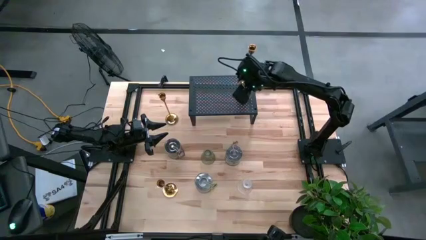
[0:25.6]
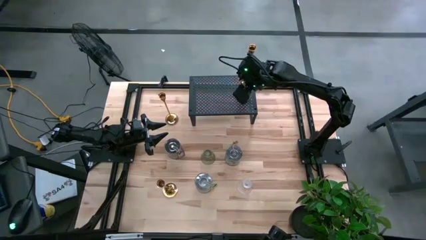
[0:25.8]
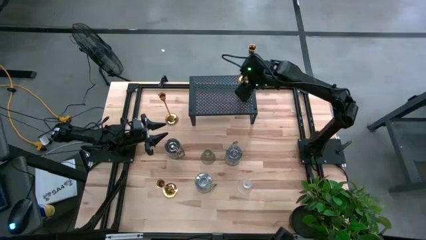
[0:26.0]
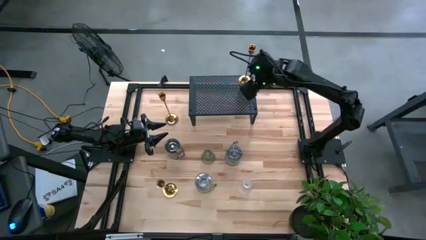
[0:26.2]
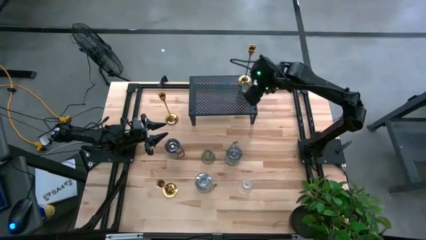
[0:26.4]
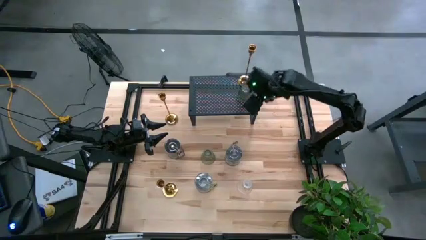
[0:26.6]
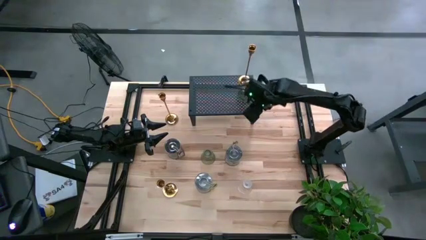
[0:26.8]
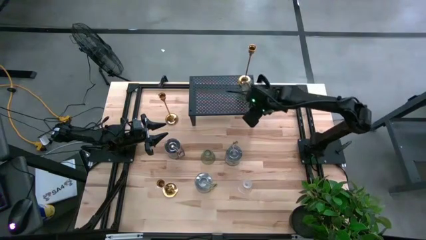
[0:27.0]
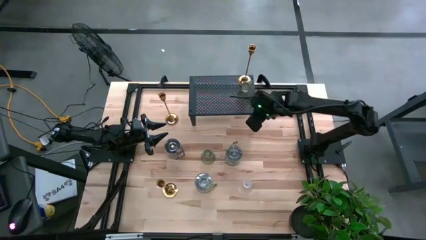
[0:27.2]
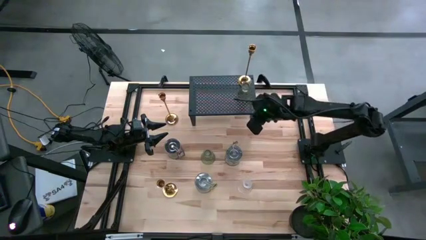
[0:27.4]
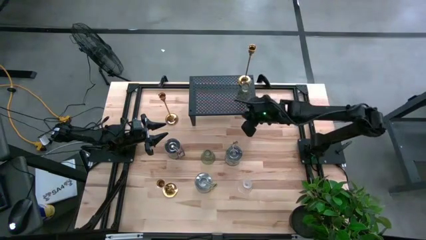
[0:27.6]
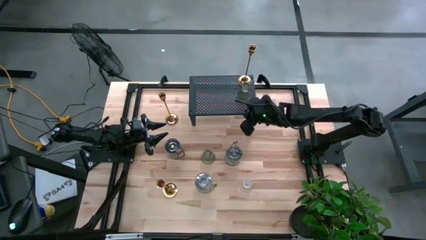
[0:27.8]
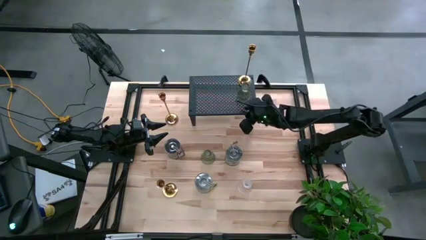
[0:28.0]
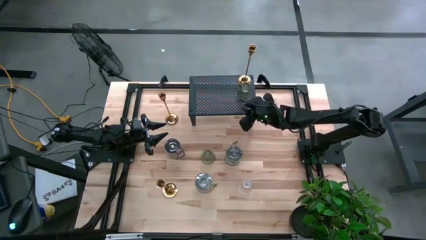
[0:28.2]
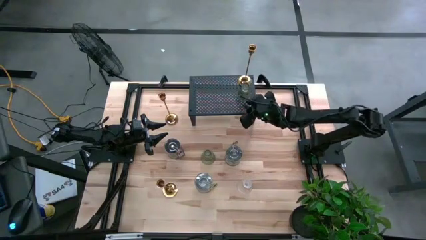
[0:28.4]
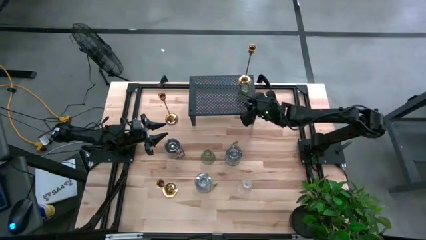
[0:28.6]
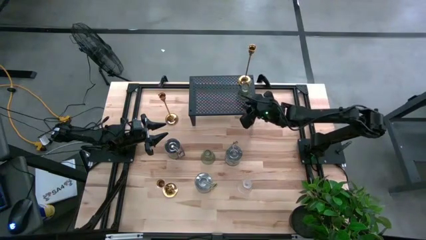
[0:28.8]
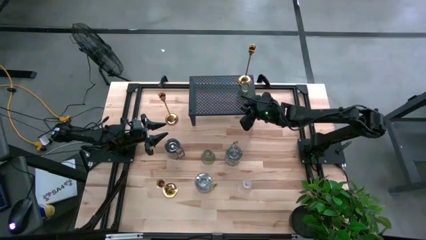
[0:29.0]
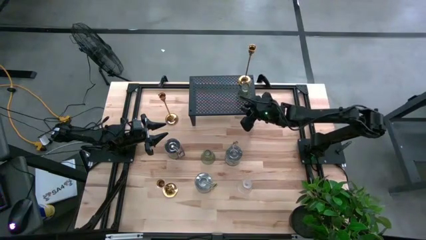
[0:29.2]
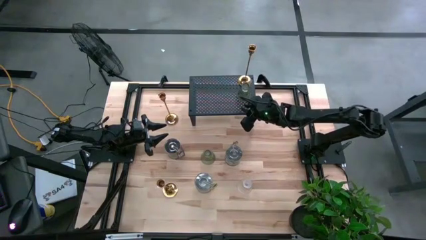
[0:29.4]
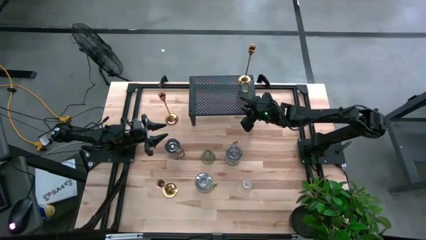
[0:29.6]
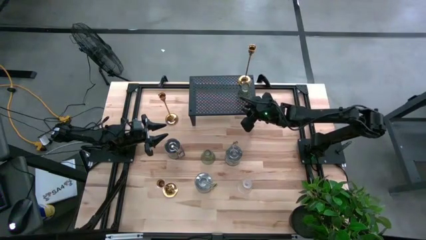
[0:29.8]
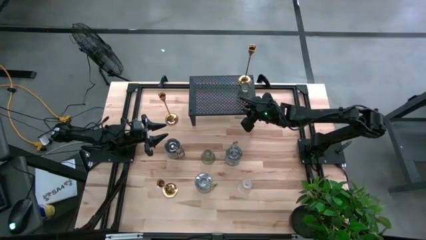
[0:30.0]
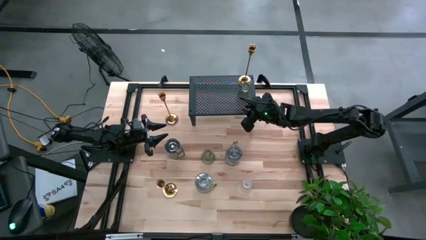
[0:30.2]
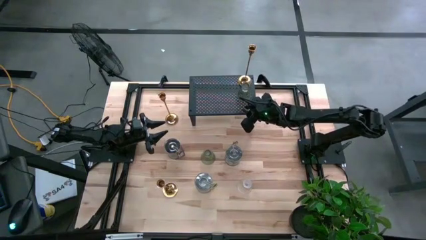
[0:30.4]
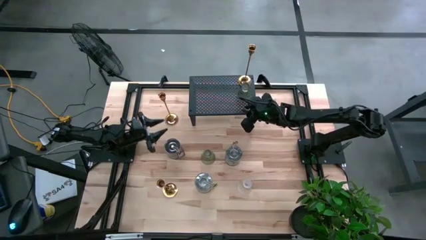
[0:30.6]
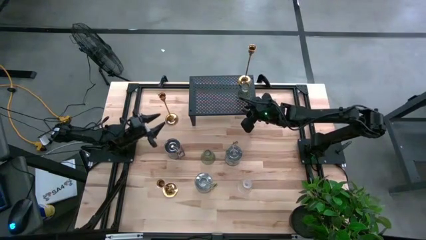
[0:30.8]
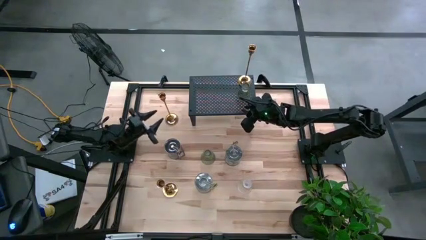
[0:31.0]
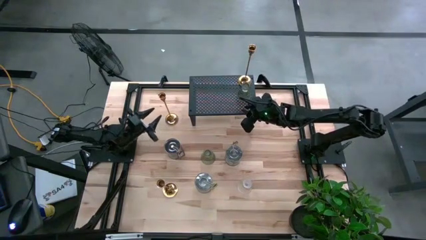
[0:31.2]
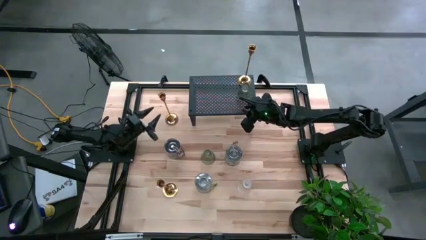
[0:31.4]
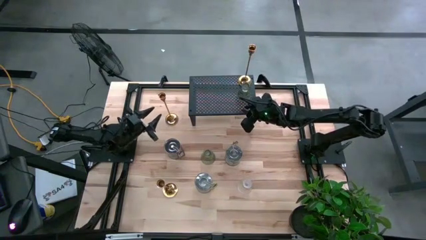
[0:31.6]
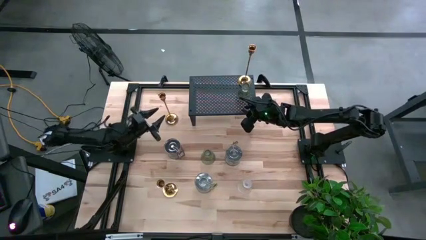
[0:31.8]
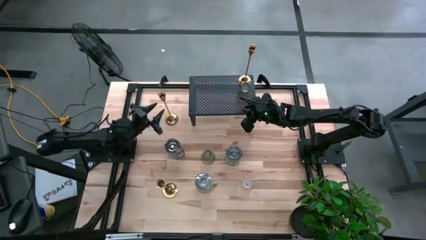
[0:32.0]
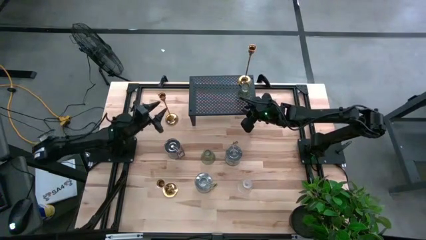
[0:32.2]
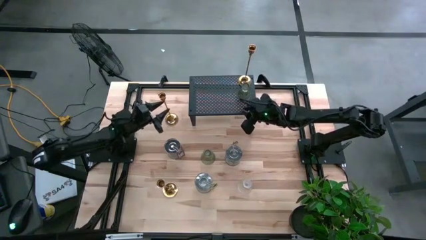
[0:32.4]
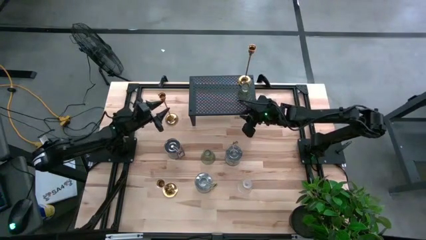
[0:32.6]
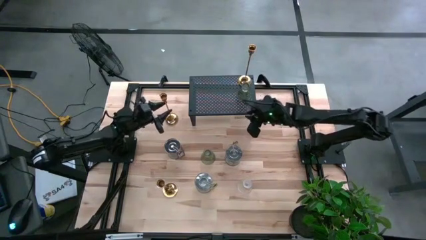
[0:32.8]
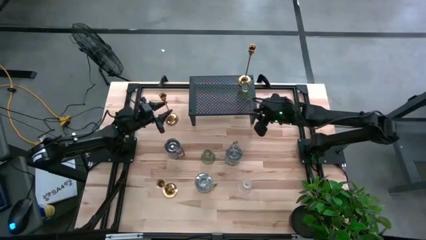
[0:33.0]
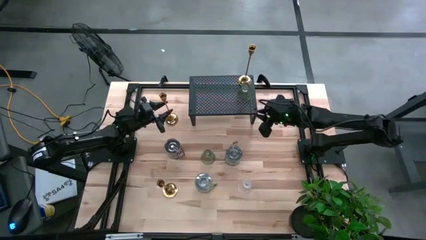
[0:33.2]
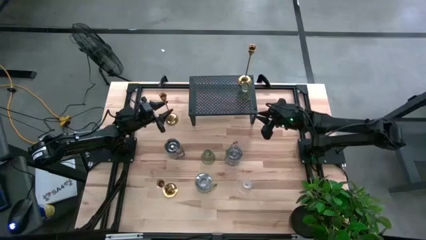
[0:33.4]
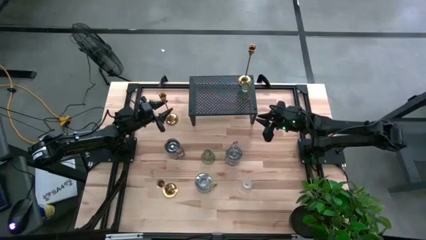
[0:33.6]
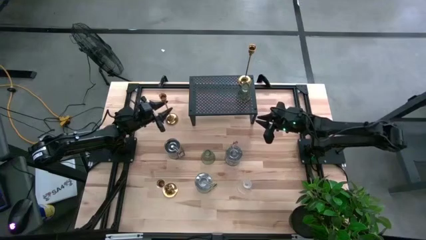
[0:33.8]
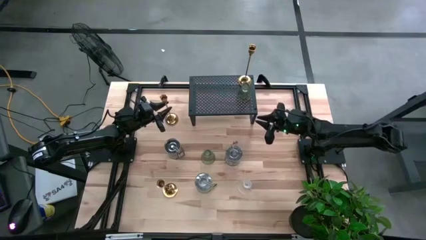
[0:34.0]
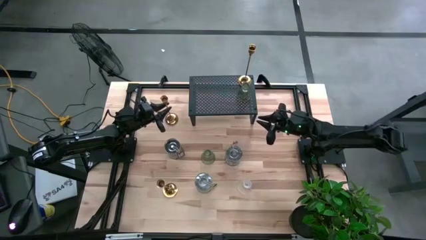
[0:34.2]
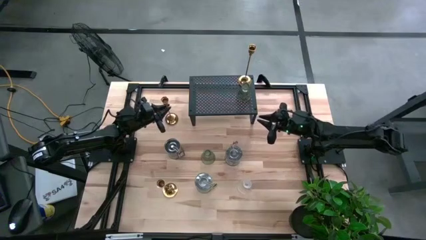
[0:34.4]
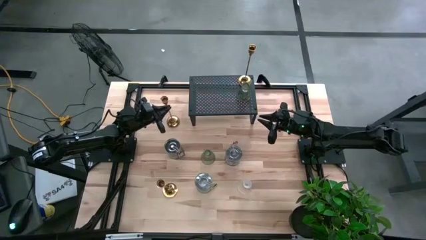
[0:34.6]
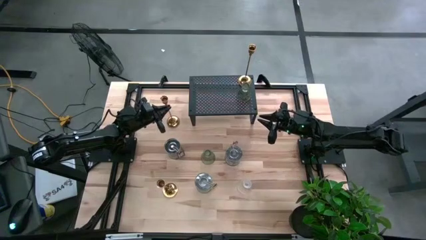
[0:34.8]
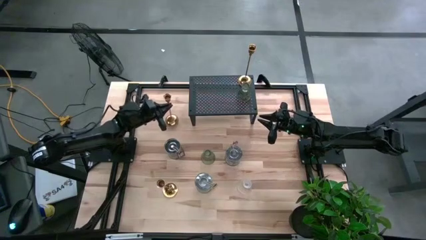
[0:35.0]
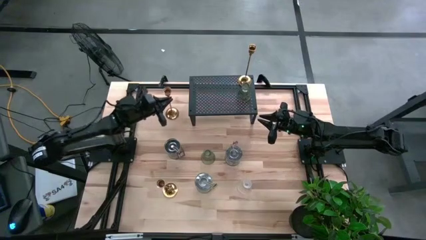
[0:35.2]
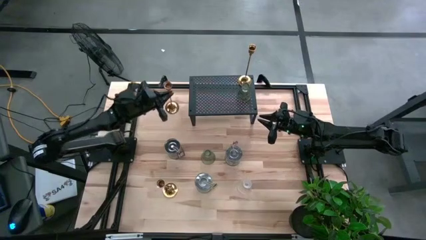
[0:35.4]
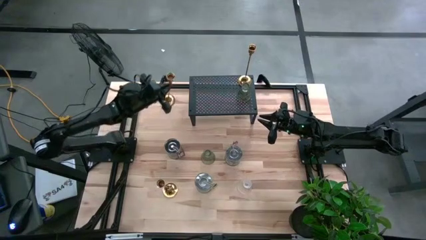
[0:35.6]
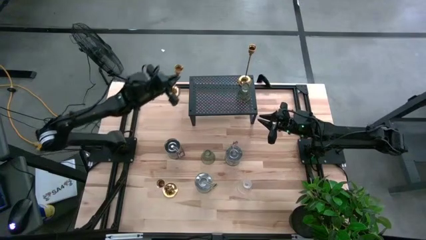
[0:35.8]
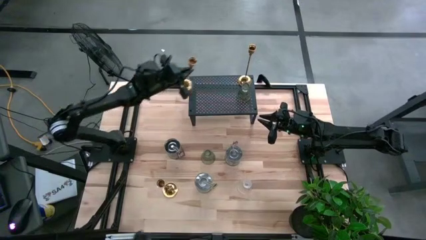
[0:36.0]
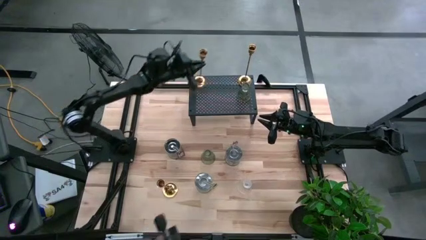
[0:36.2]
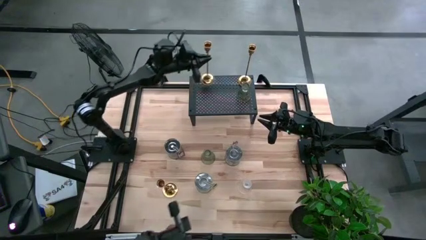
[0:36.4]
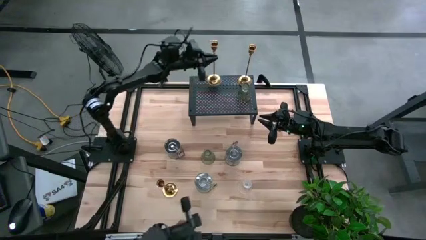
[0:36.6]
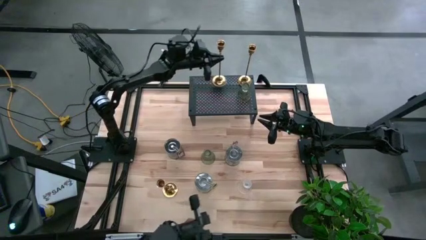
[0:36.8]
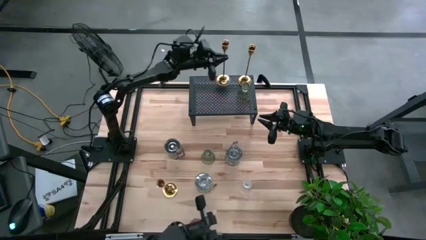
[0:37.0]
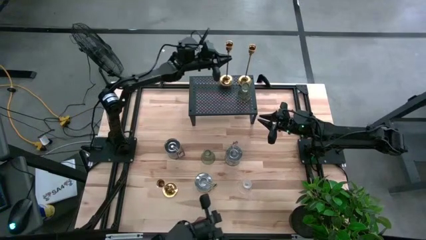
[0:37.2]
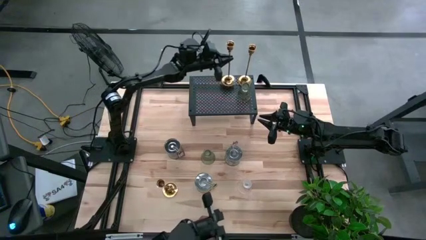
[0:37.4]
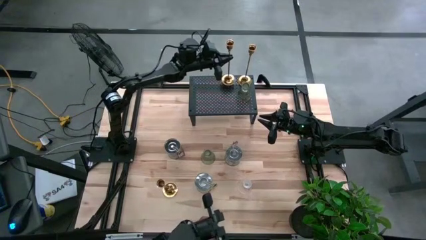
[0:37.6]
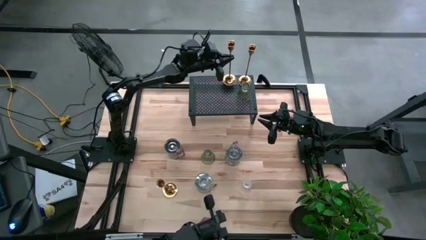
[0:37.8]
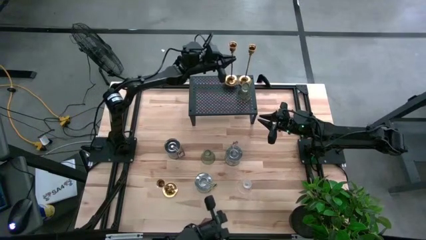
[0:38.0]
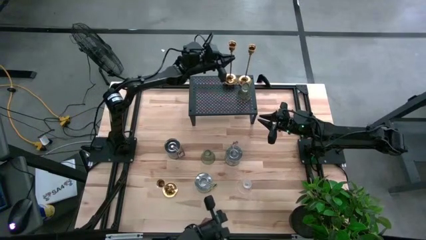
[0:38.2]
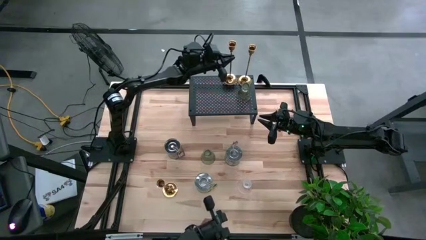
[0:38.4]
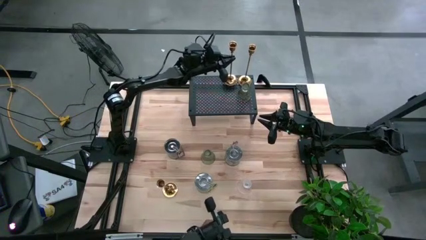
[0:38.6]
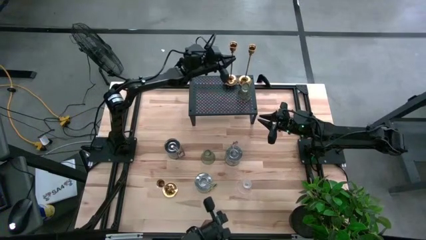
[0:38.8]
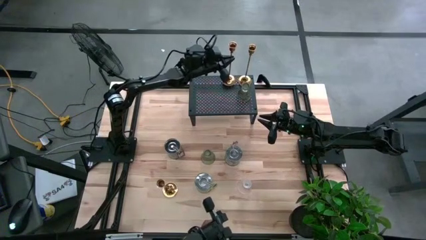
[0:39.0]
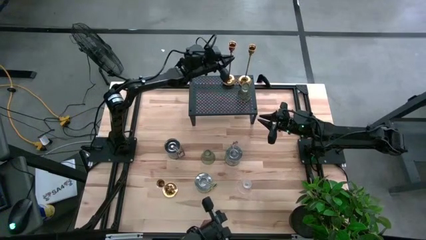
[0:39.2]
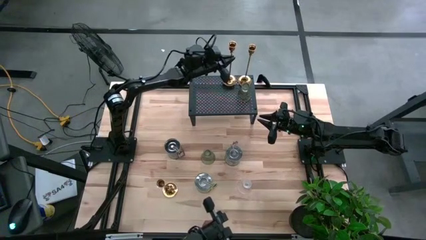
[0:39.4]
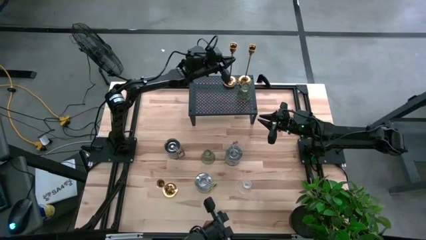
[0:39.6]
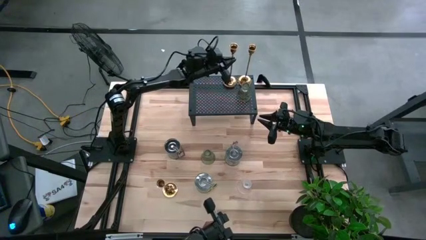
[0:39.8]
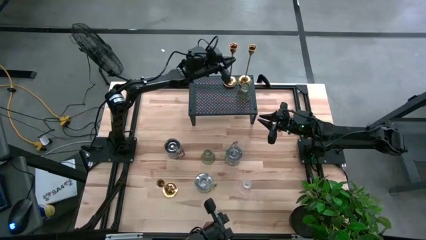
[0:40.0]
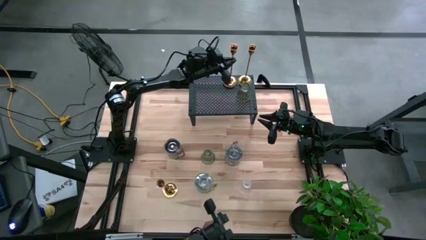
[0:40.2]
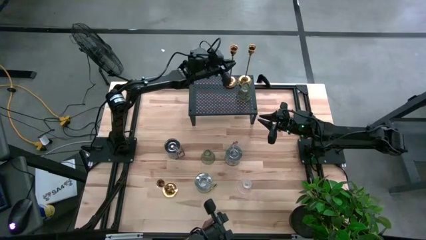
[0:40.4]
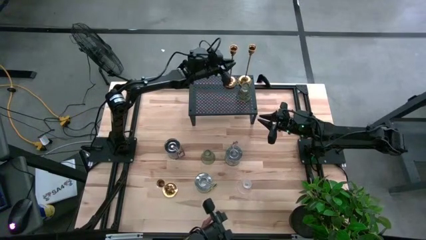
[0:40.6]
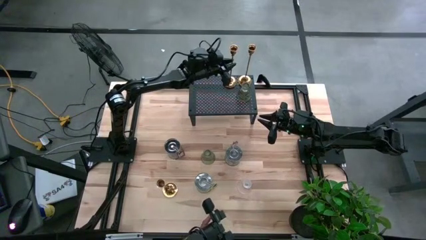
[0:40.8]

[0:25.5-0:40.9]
Task: Pick & Place candle stick holders
Put the top gold candle holder on the shelf aligned with the gold candle holder
